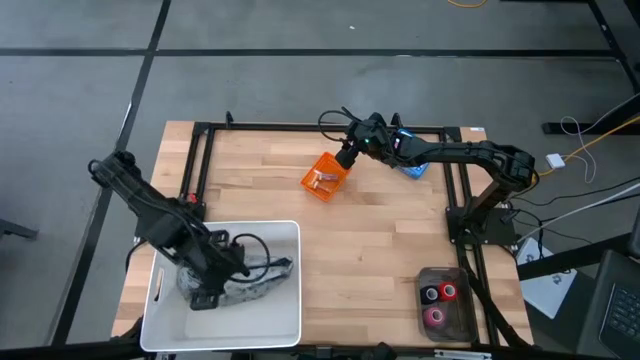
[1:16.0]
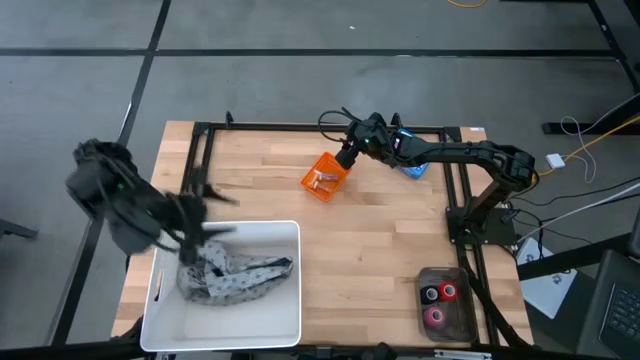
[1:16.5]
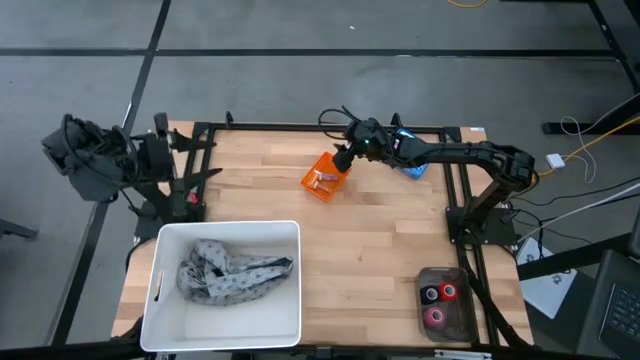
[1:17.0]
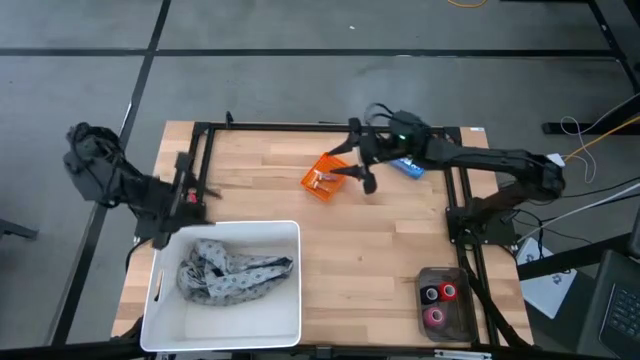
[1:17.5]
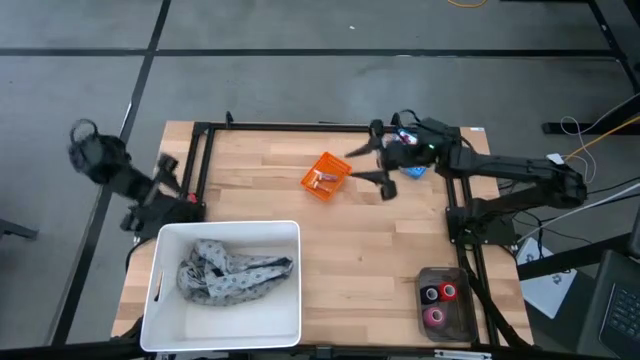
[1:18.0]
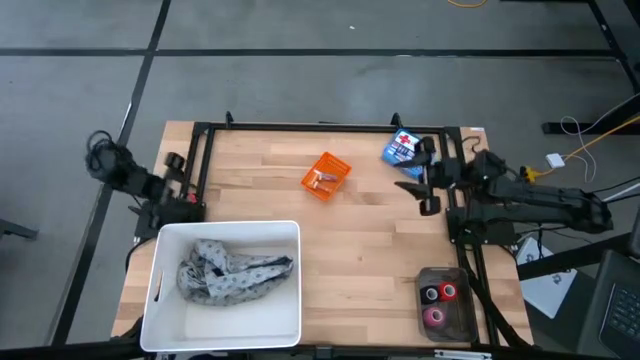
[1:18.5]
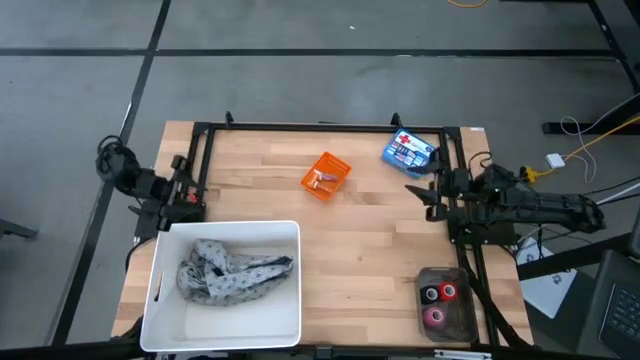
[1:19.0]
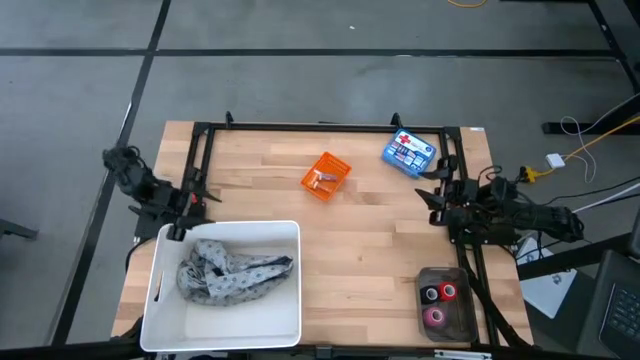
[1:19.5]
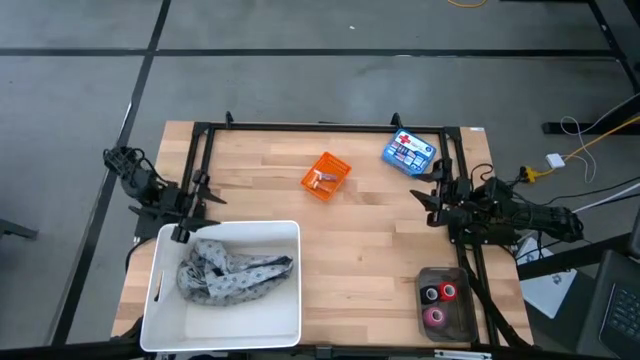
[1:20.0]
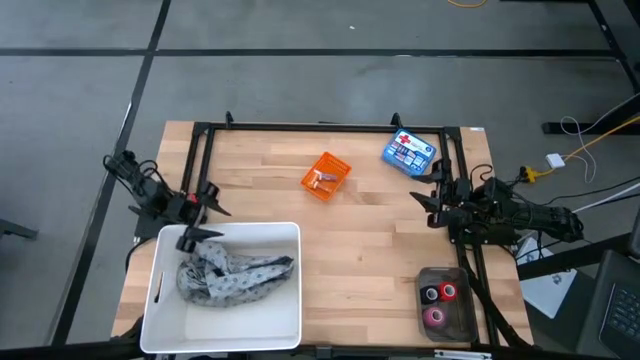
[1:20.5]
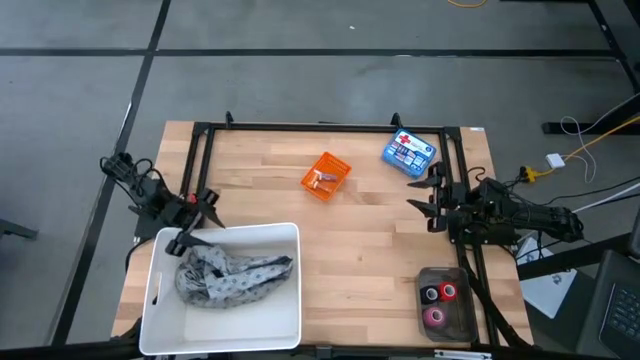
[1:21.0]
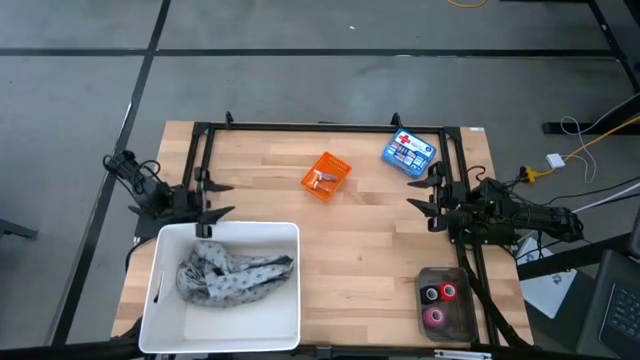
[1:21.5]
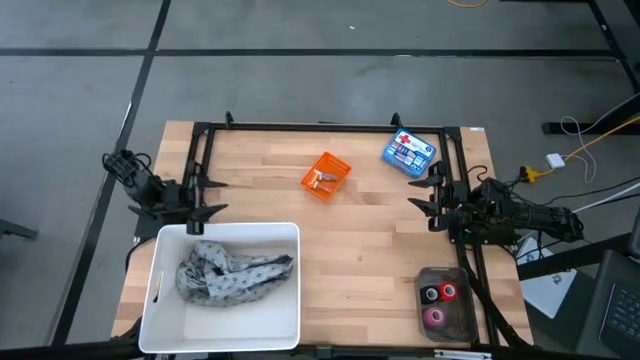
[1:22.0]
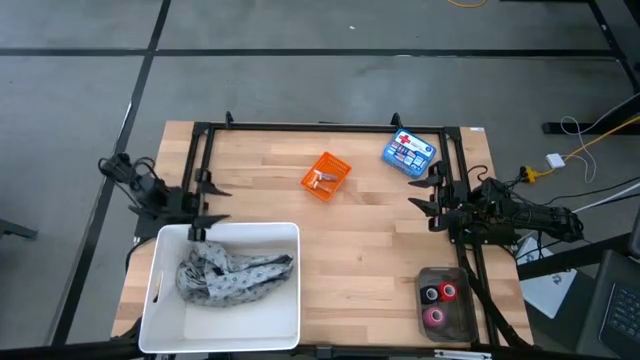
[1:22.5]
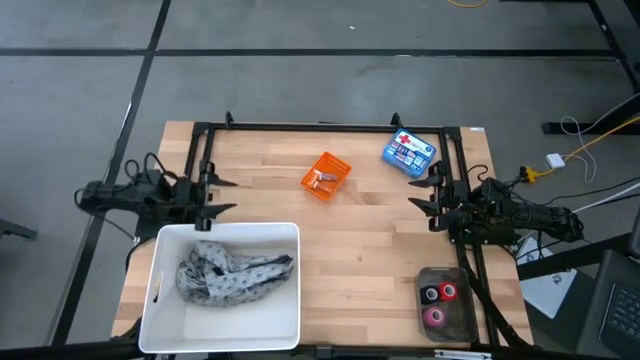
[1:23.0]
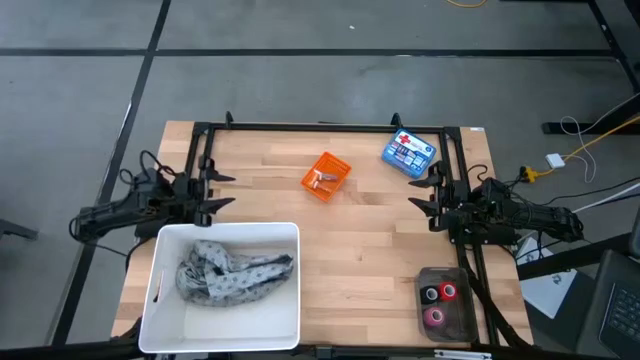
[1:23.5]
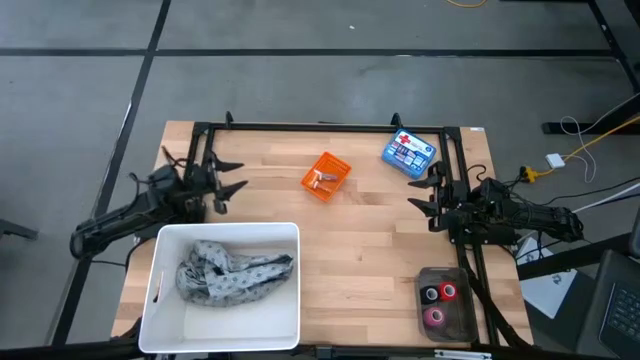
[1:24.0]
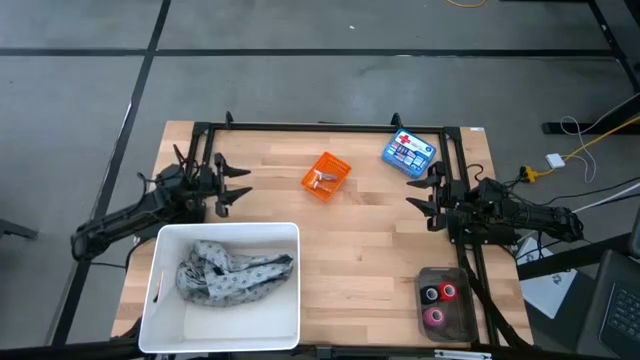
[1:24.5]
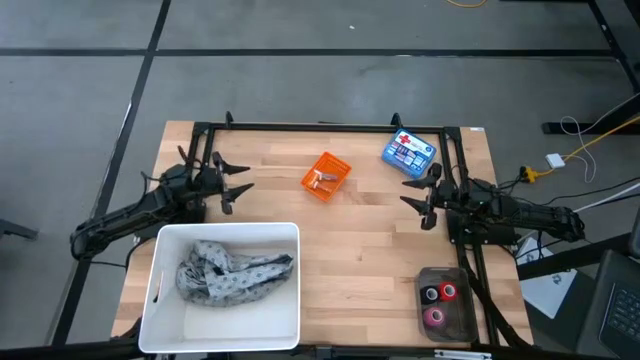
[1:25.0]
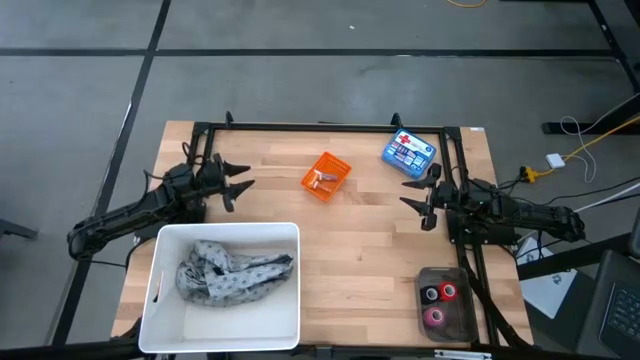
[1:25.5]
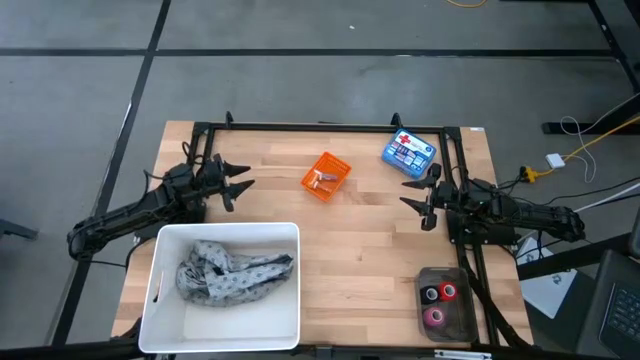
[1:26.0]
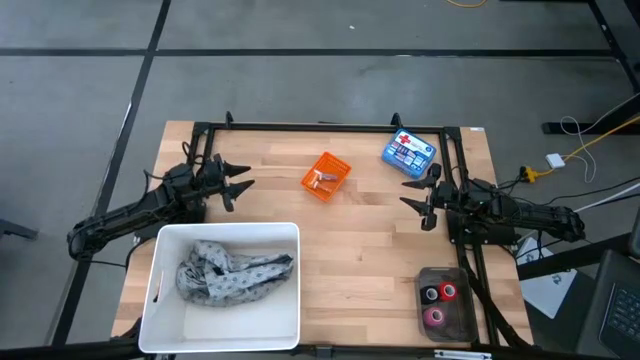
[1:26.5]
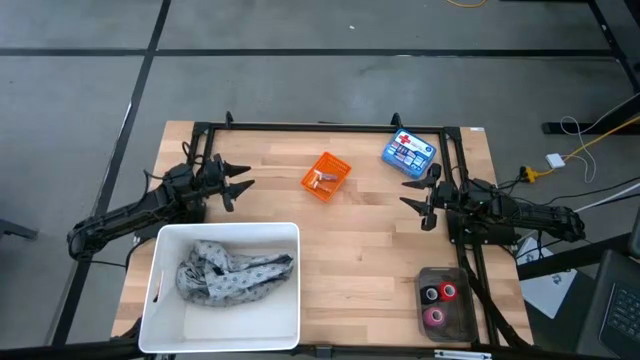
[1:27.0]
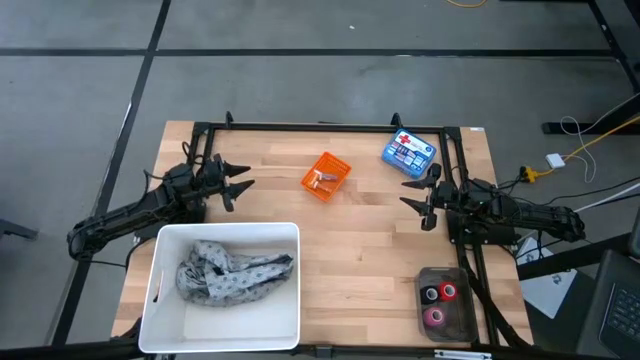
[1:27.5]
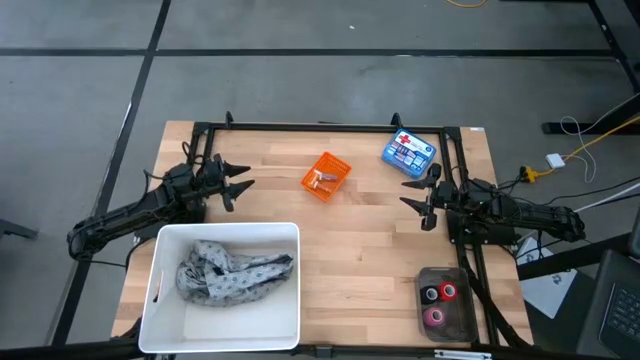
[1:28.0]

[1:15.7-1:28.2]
Task: Pick & place medical supplies in basket/bin
Return to Home Position

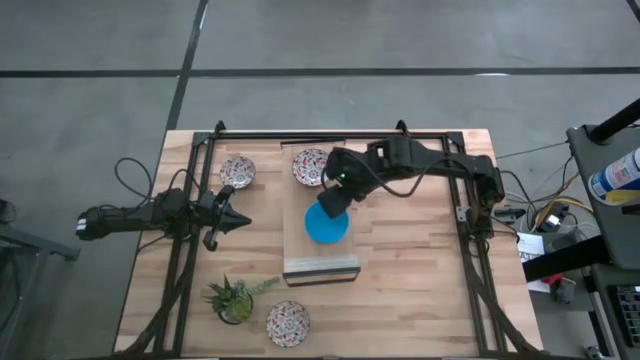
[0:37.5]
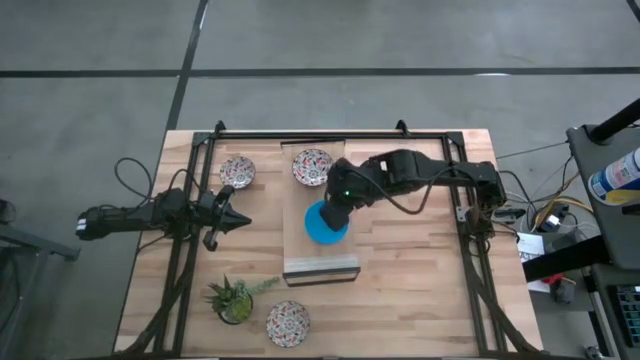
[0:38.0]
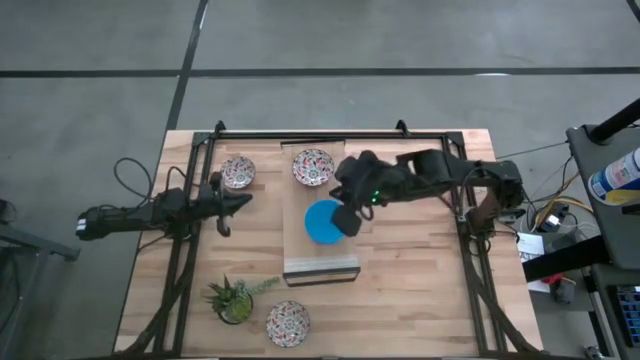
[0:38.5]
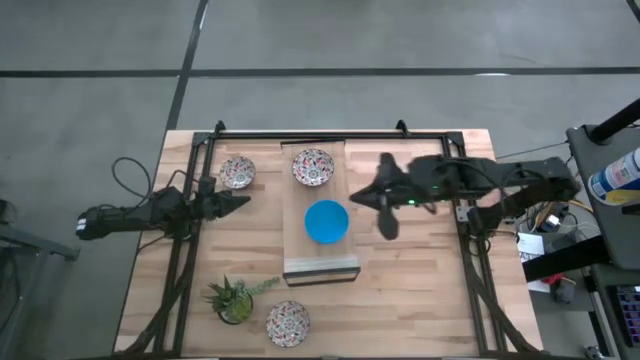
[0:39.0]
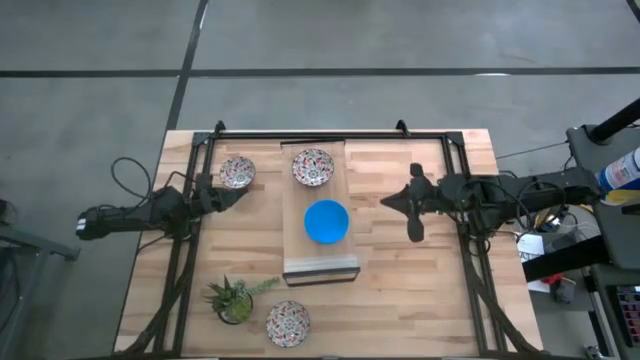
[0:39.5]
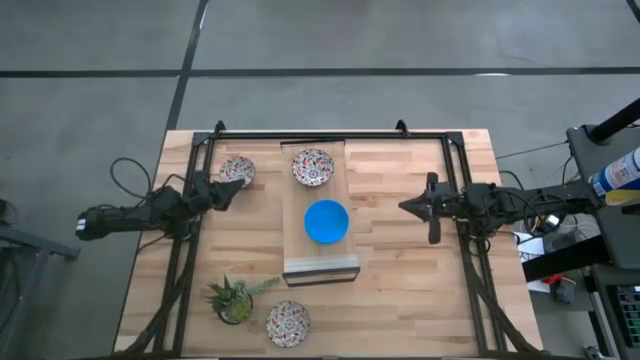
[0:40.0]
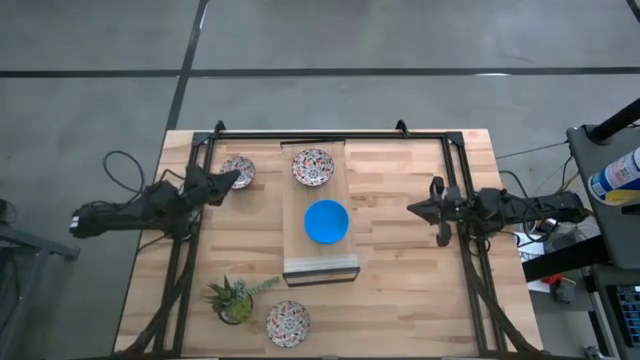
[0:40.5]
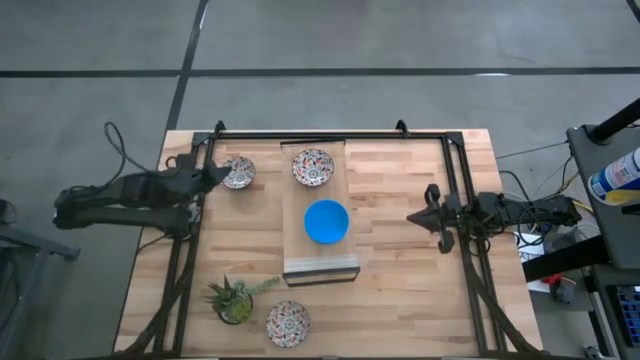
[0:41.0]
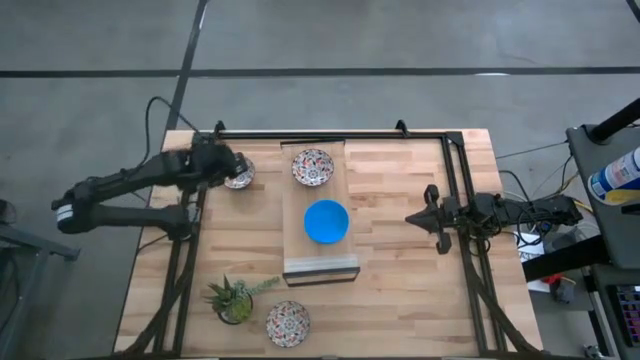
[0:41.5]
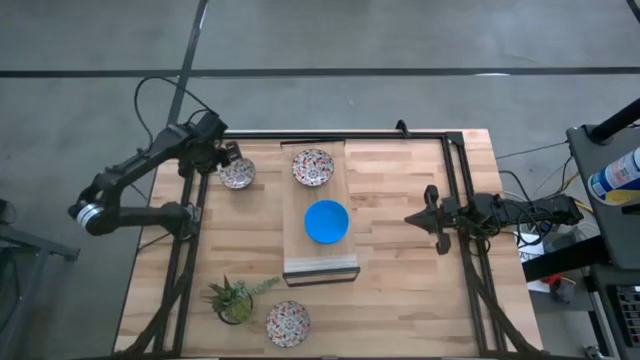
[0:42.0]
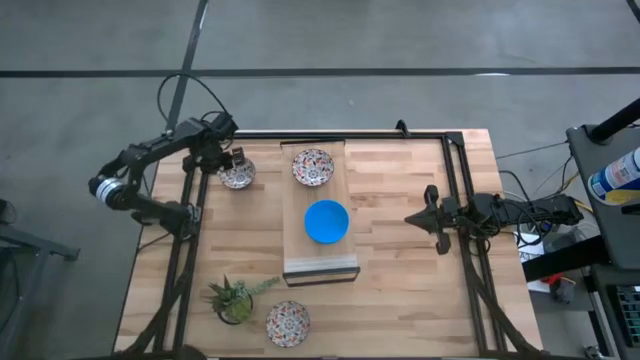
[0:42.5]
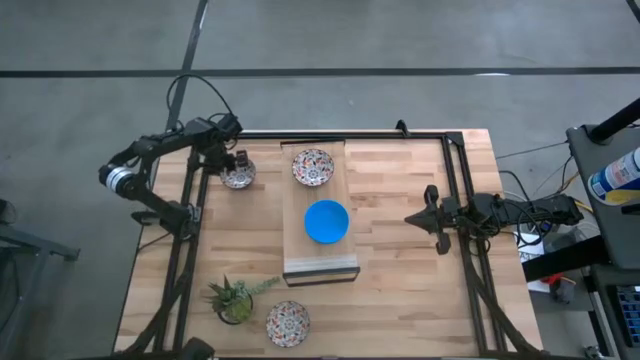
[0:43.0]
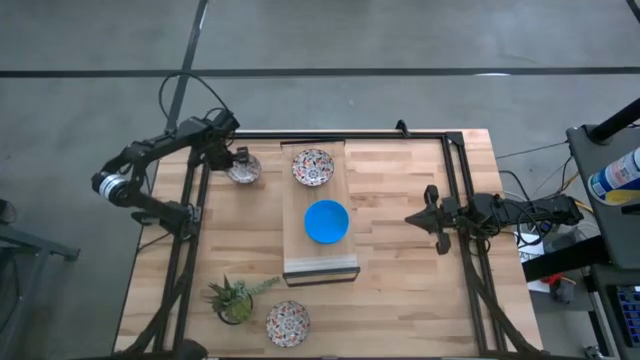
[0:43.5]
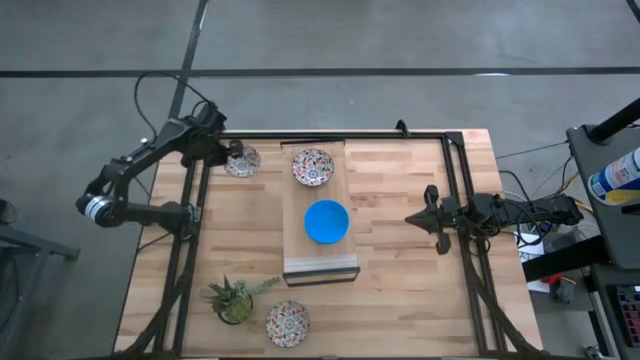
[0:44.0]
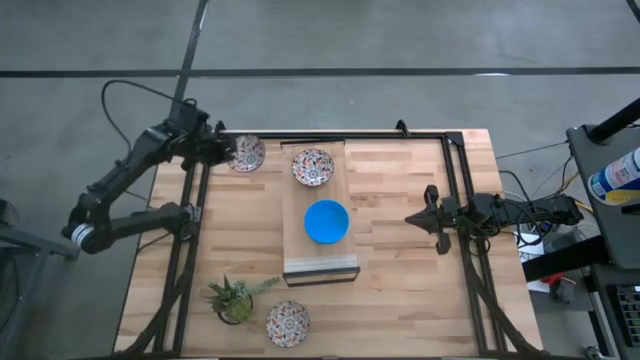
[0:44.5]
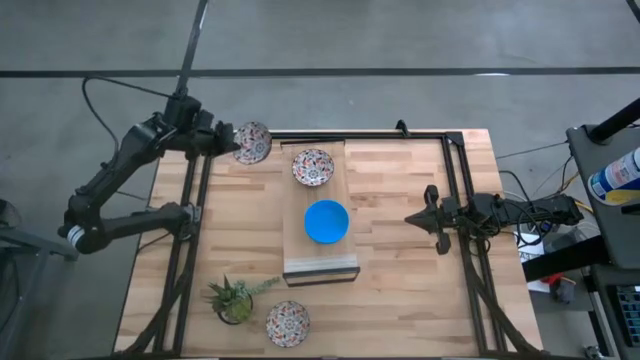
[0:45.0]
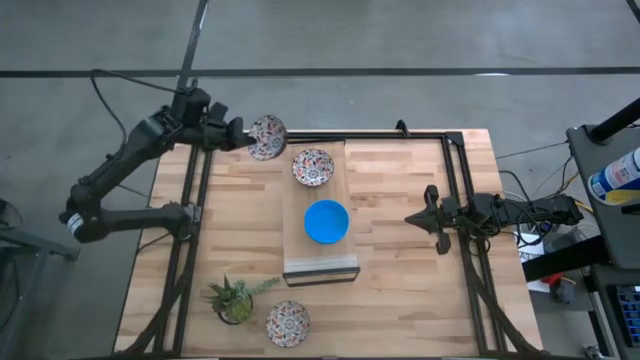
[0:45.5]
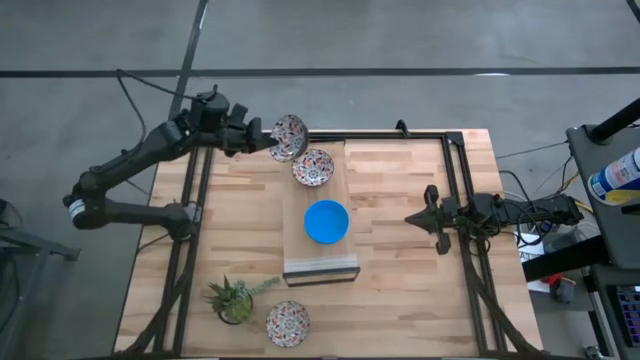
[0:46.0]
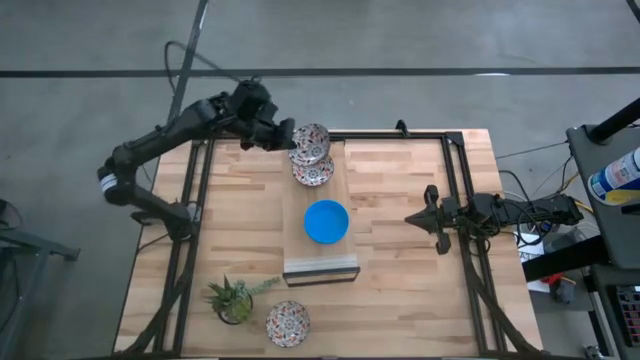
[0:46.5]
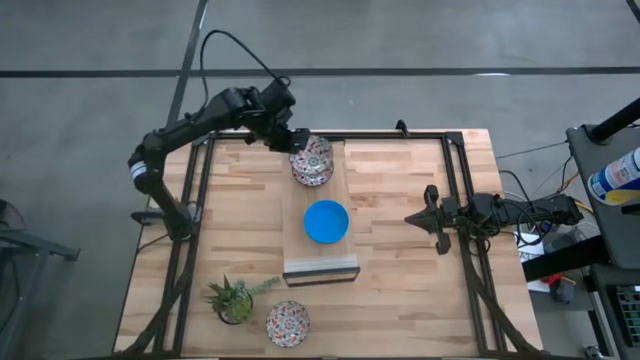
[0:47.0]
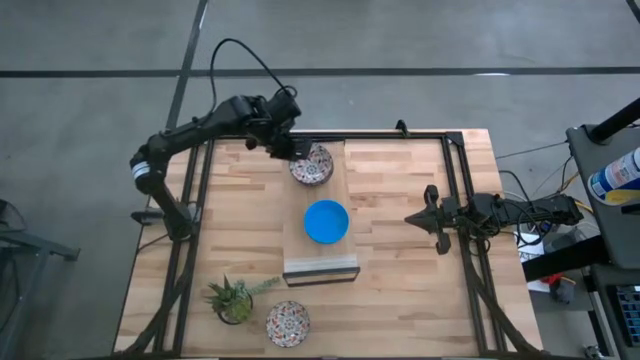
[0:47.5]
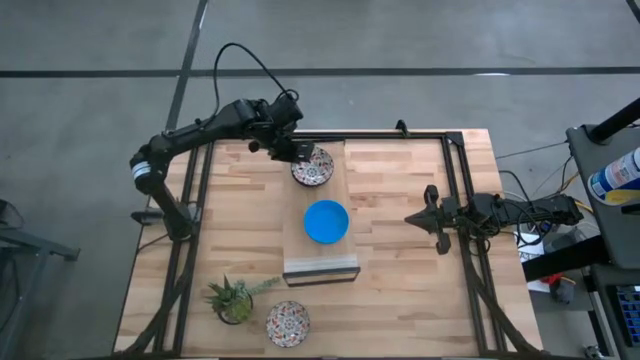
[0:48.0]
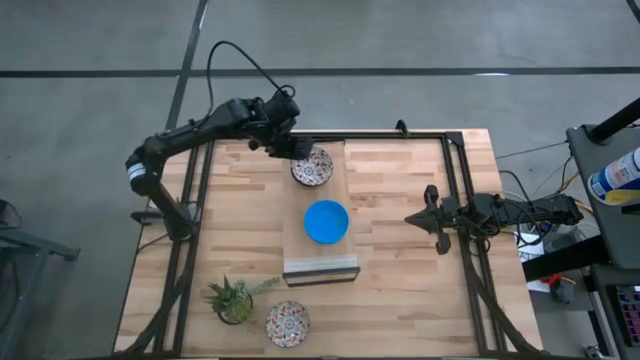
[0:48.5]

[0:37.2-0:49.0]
Task: Pick & Place Mini bowls
Stack the top white bowl on top of the white bowl on the shelf
